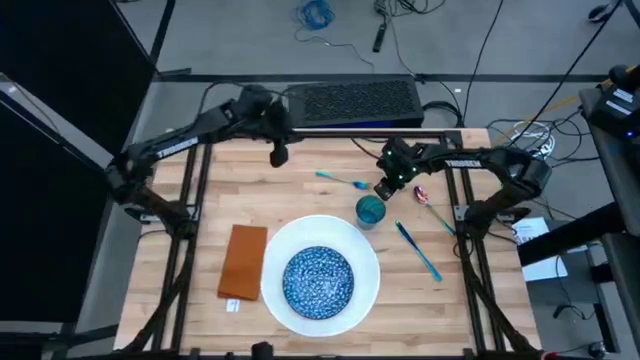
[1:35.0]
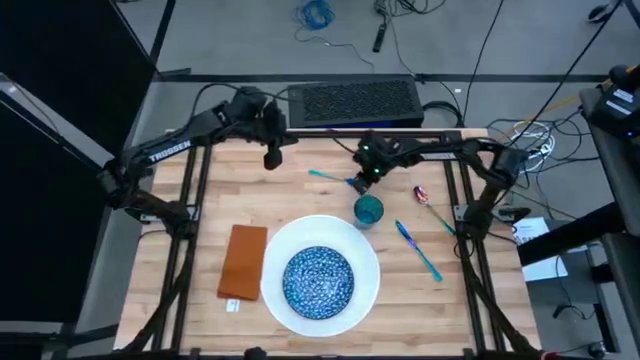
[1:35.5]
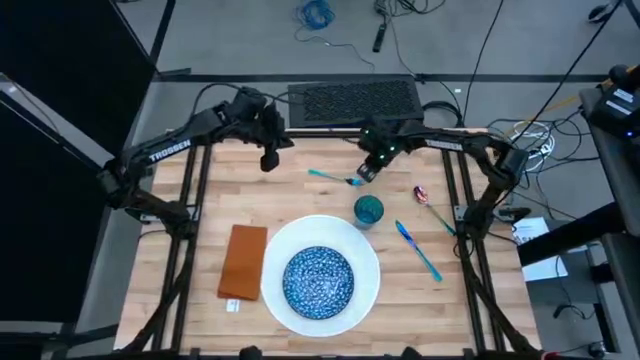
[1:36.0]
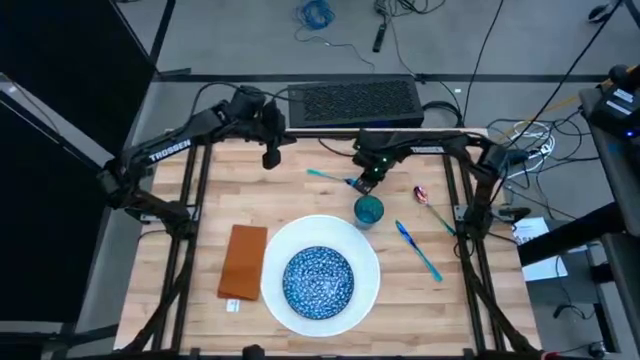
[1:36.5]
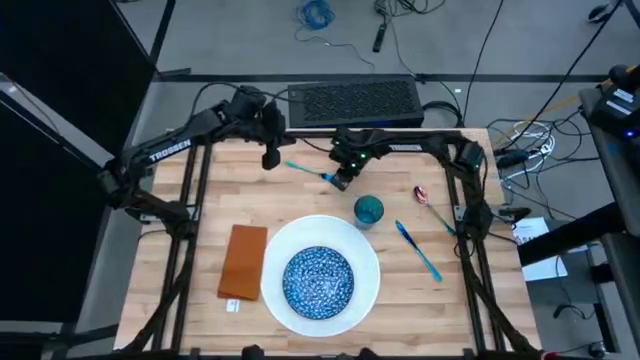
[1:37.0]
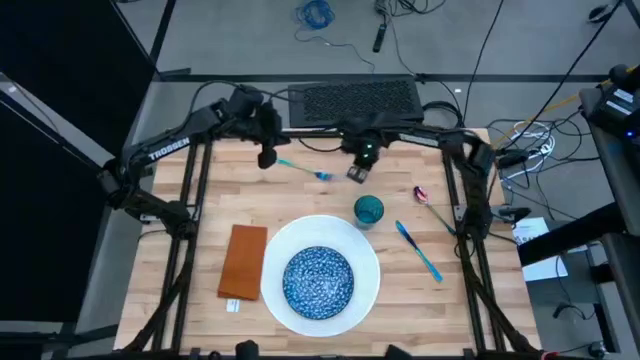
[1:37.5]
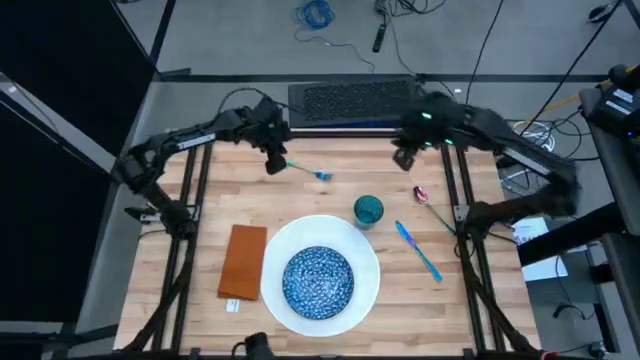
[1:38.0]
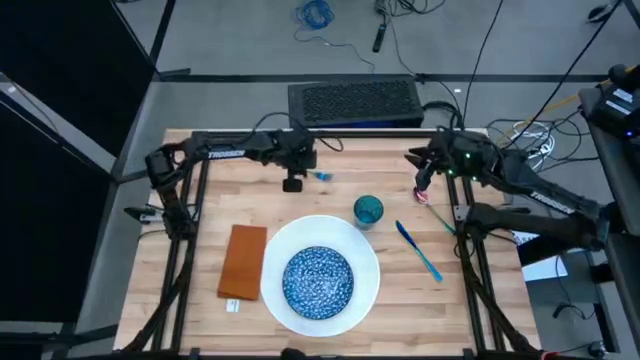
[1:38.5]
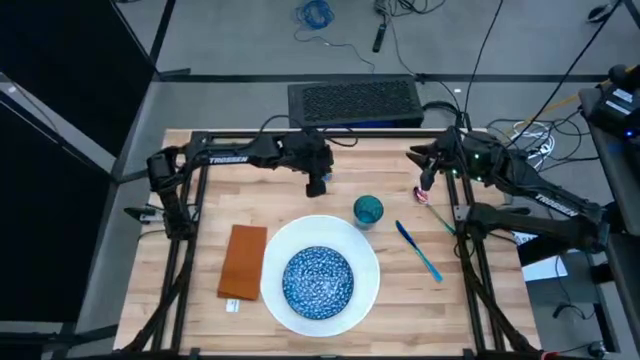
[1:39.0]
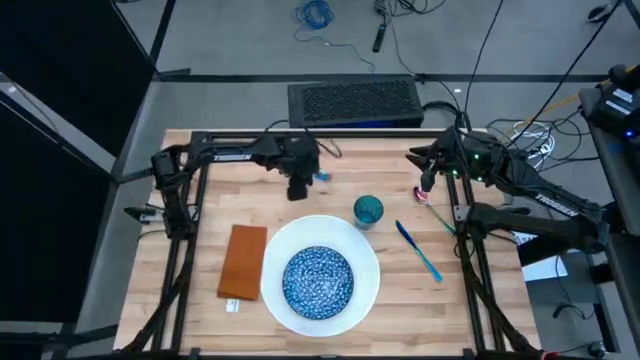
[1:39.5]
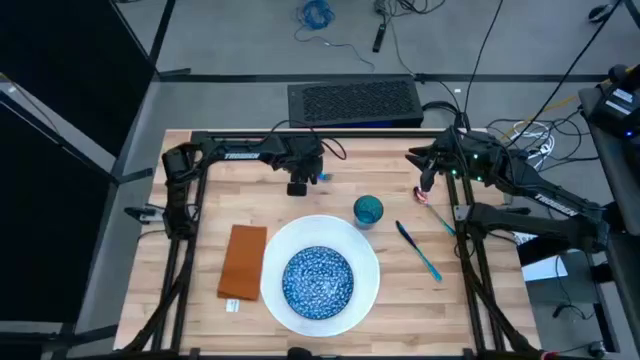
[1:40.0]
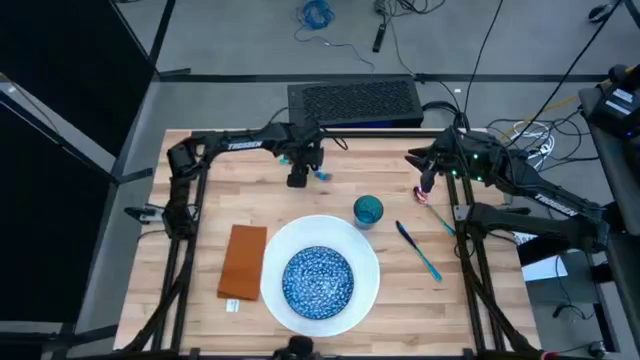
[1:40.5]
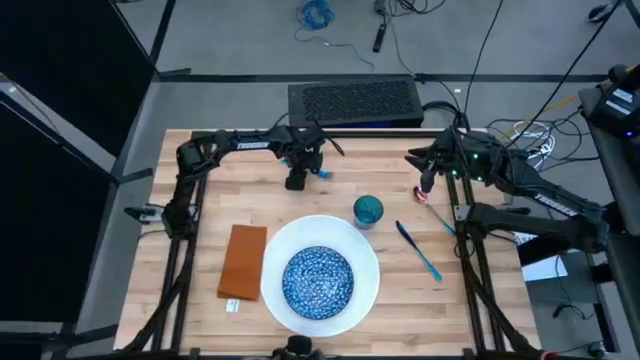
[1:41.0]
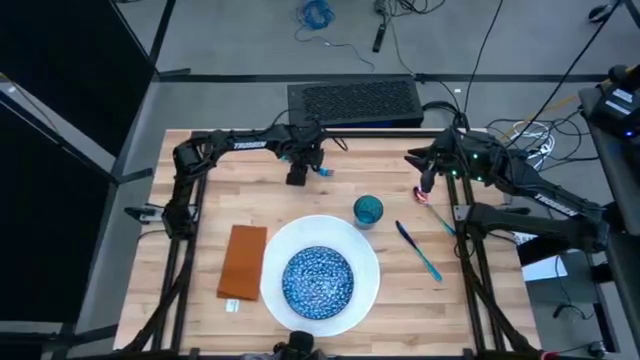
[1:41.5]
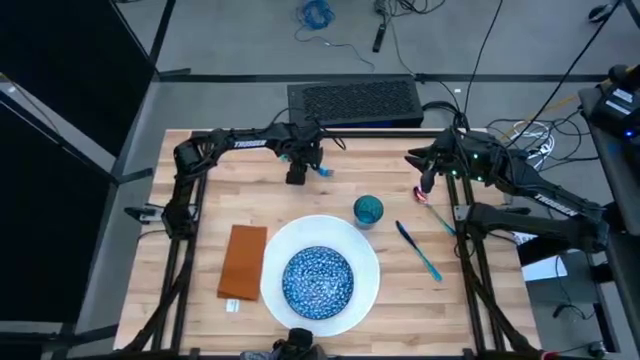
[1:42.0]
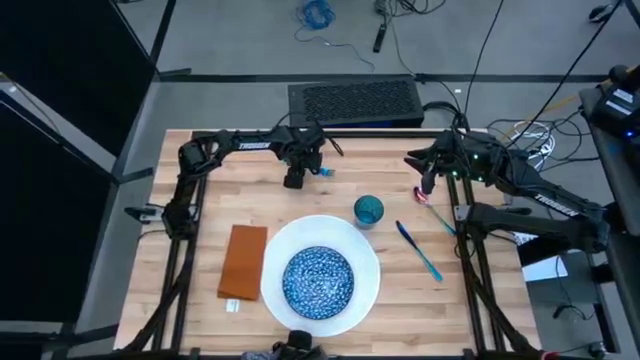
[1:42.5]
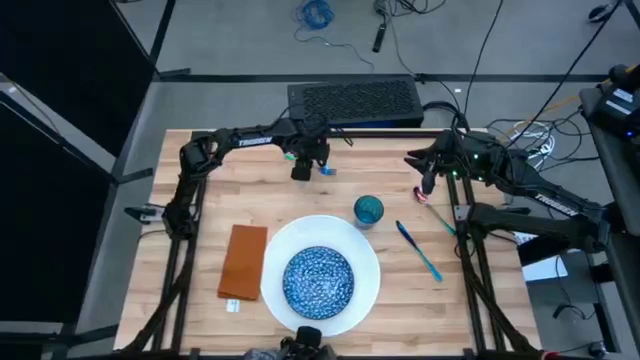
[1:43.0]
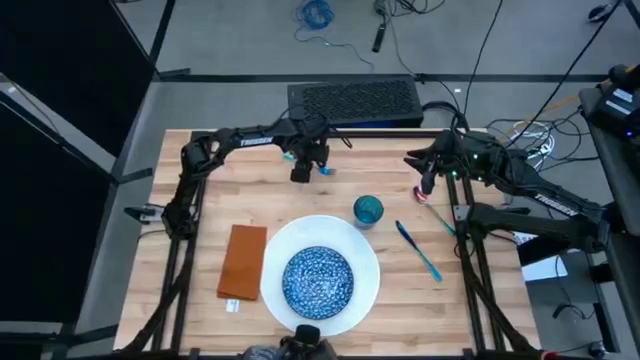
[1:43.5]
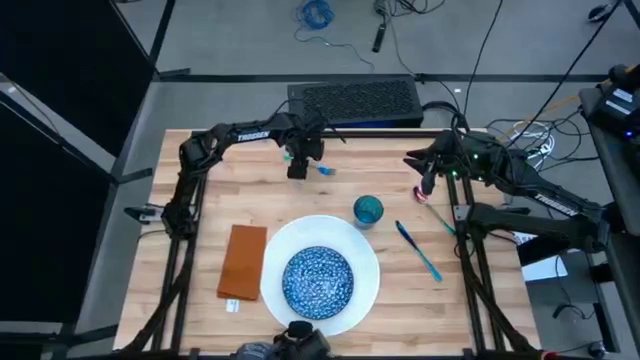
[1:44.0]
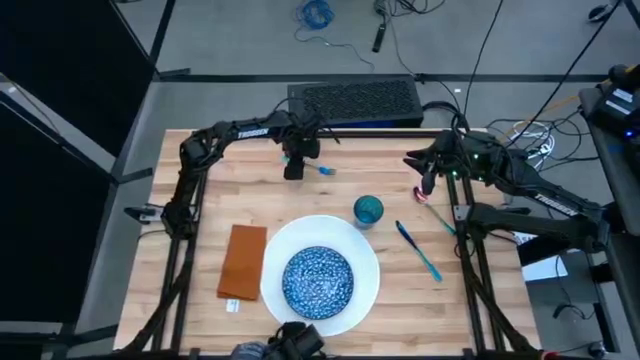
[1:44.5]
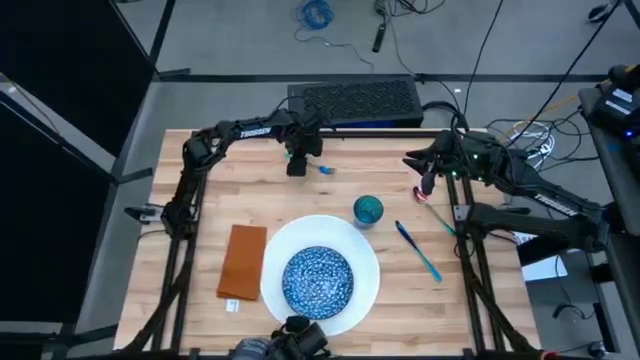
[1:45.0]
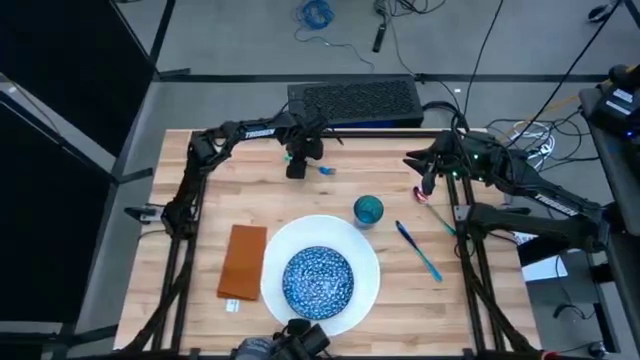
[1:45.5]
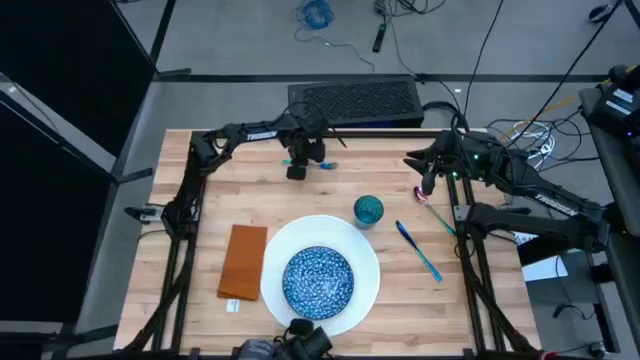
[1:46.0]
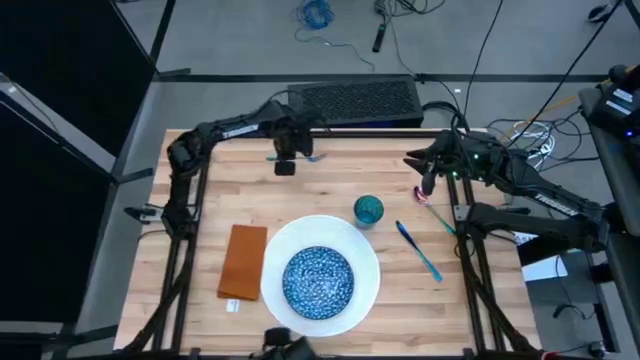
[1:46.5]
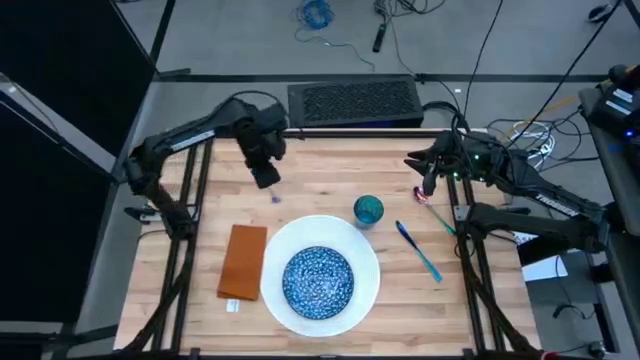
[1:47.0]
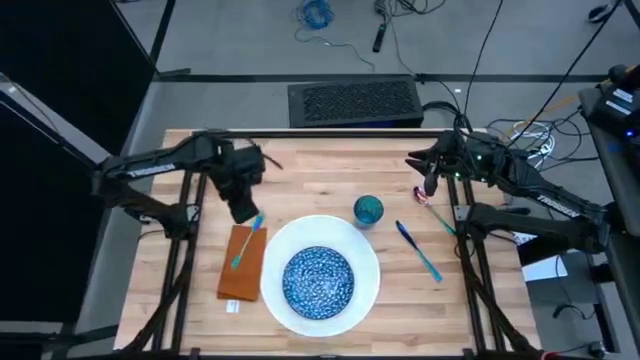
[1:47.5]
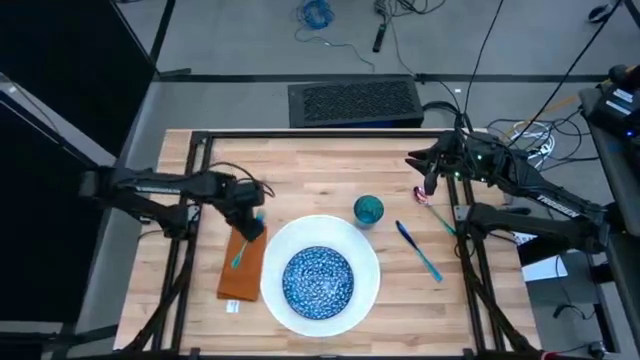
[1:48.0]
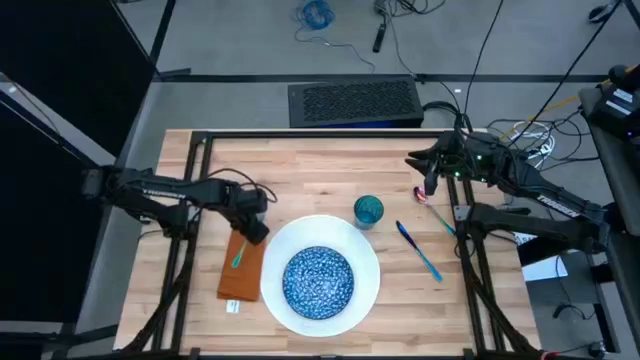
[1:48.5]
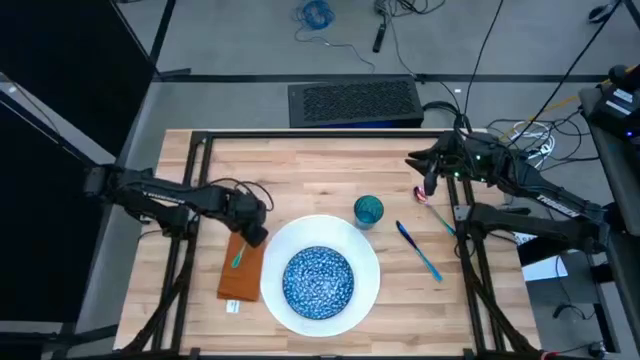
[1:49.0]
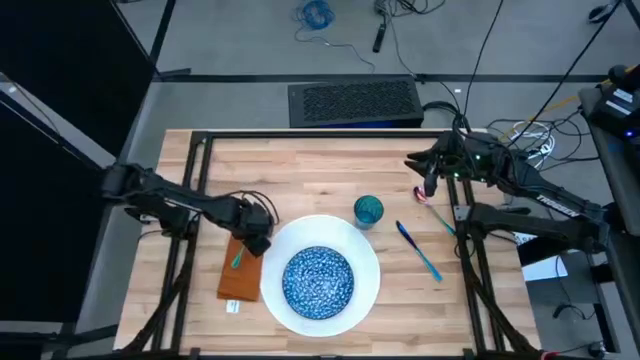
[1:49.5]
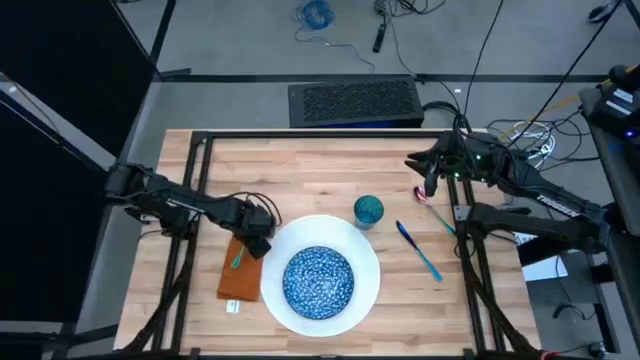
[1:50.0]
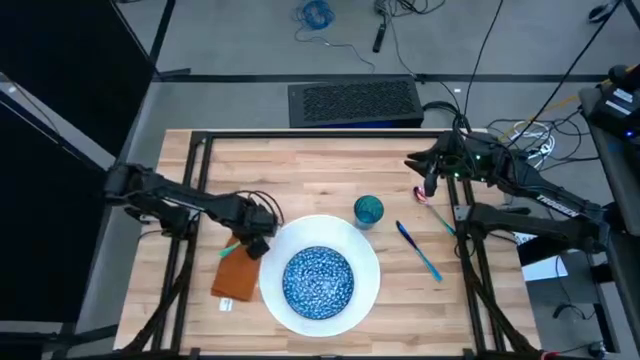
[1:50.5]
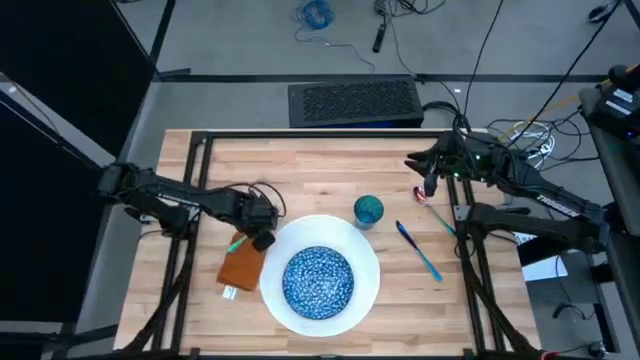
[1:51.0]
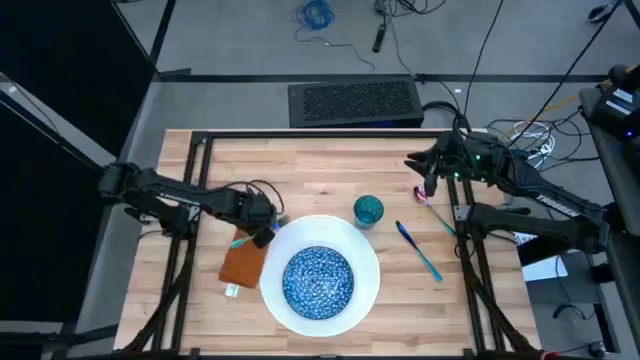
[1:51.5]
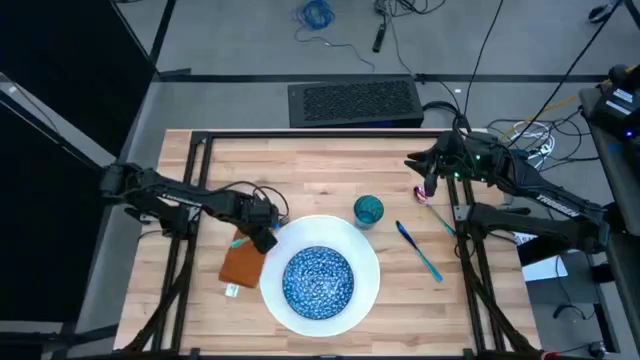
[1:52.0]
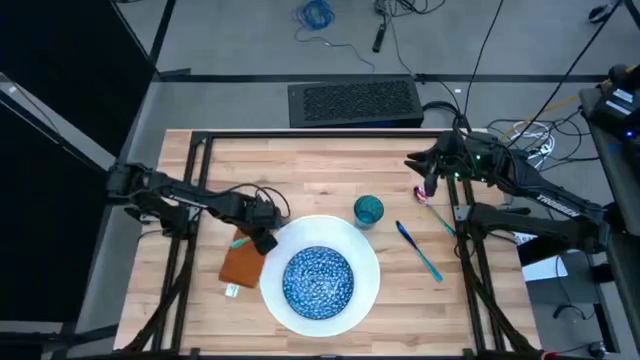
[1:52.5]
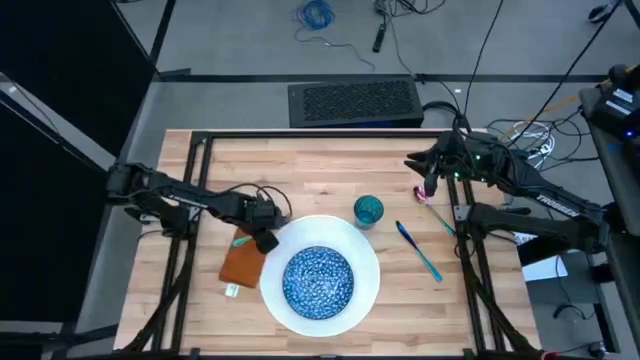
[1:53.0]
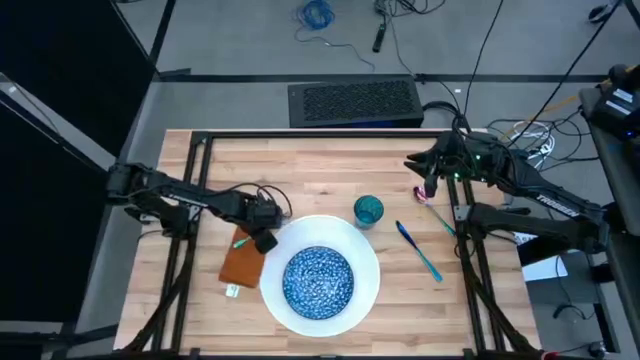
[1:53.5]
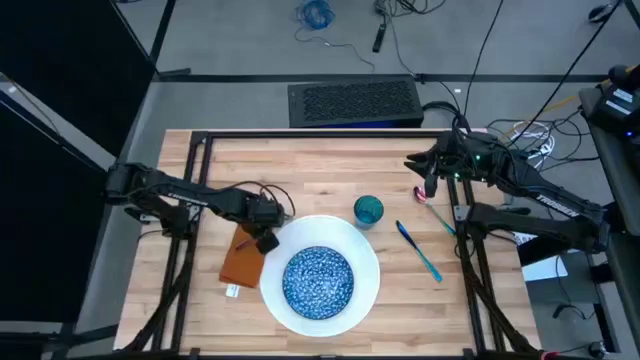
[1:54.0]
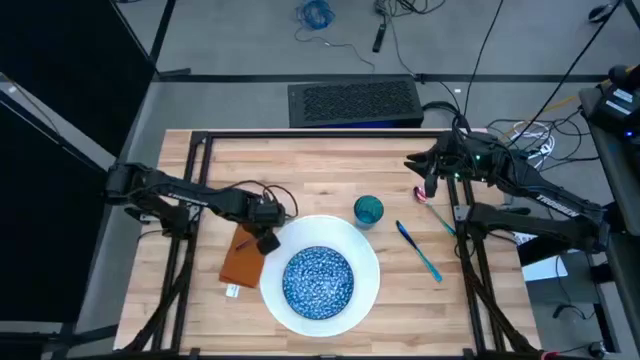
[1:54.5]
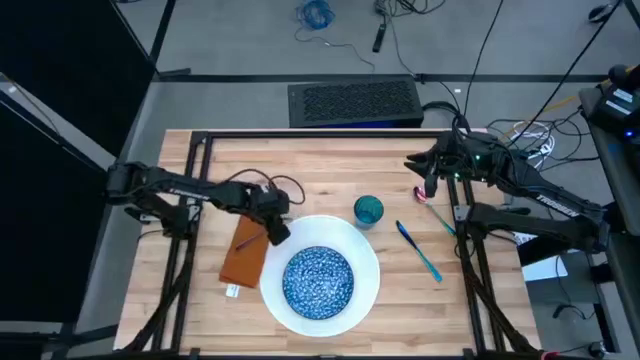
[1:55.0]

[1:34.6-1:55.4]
Task: Set table place
Stack the blue fork on top of the brown table napkin
